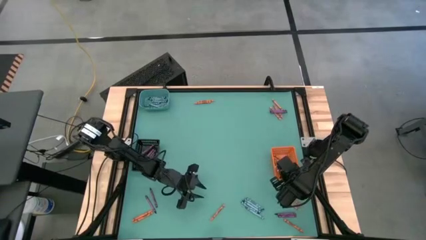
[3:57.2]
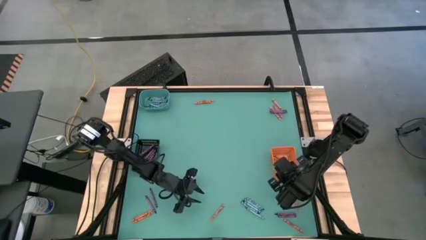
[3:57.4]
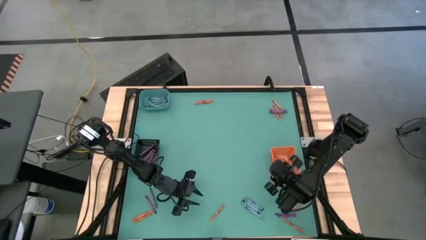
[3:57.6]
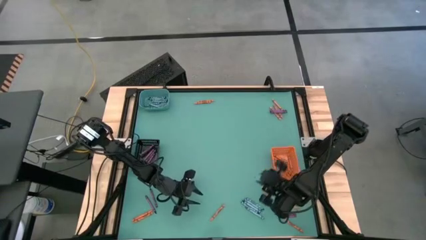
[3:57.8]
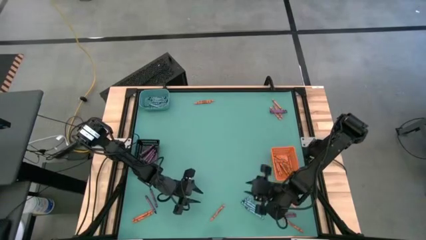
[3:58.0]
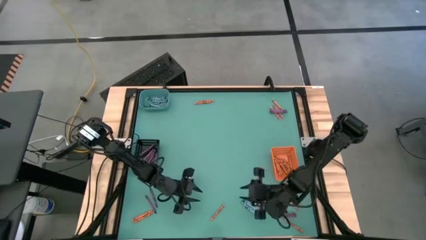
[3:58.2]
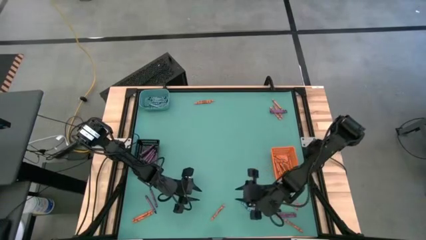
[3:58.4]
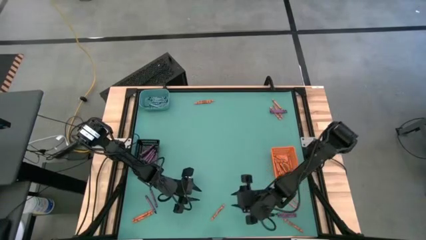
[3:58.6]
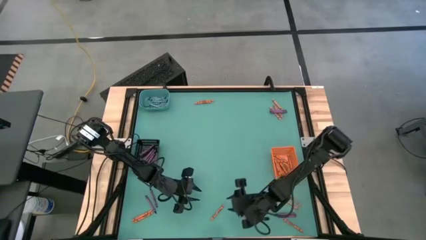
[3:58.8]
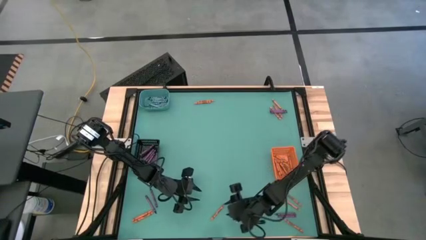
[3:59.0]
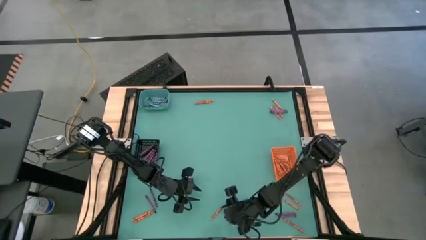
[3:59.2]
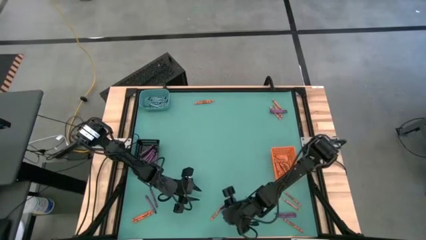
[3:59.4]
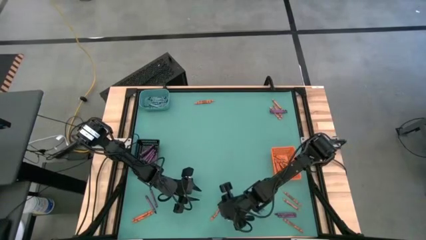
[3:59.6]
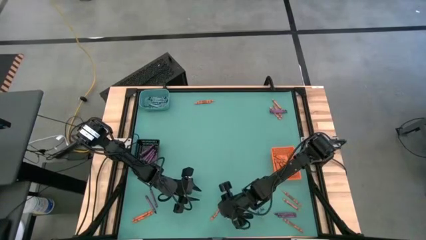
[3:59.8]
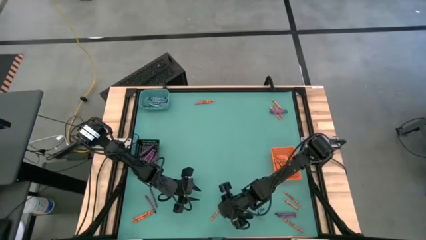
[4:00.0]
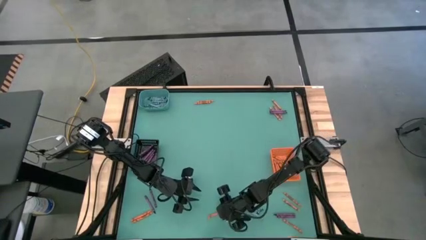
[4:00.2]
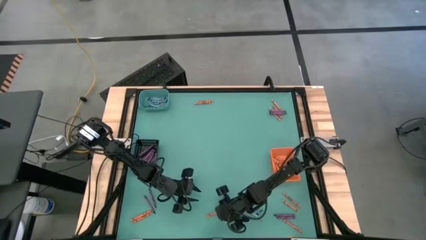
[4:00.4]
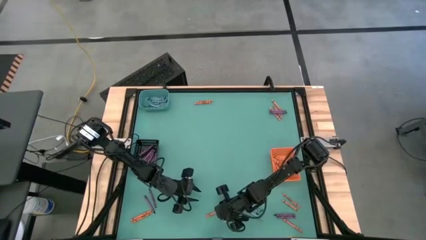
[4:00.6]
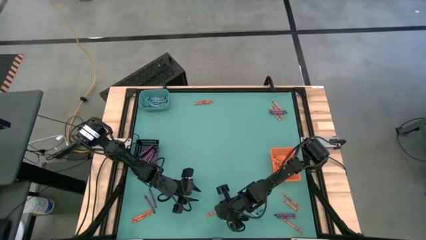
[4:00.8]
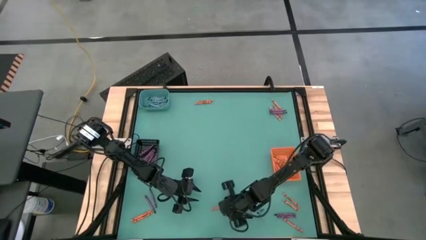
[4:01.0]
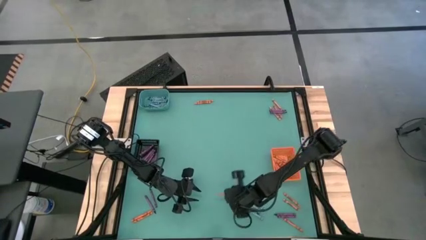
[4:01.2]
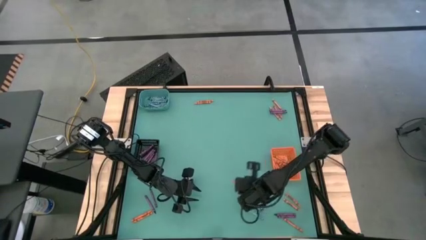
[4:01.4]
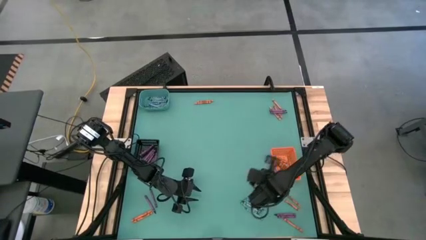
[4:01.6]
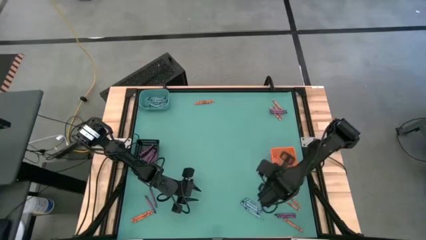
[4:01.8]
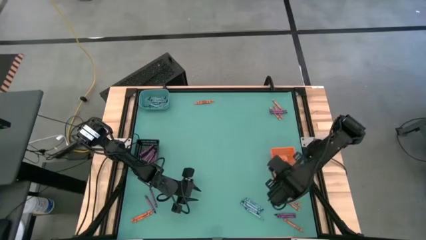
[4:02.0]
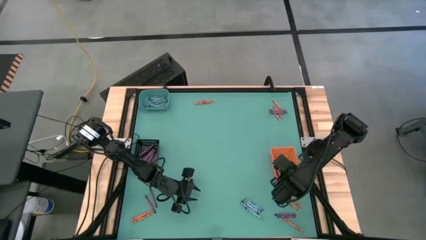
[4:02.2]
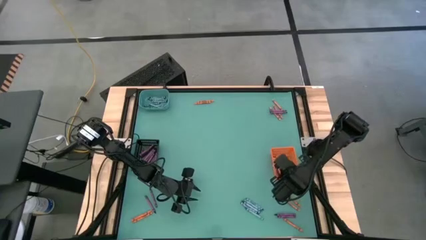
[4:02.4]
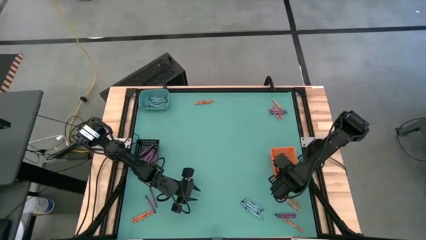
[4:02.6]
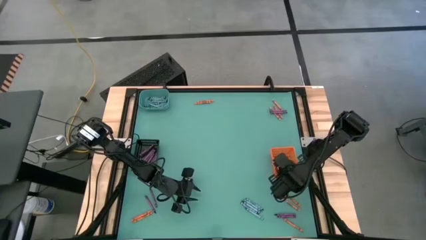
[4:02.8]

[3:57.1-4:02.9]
Task: Sort crayons
Put the orange crayon into the orange bin

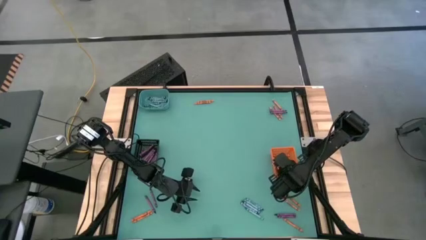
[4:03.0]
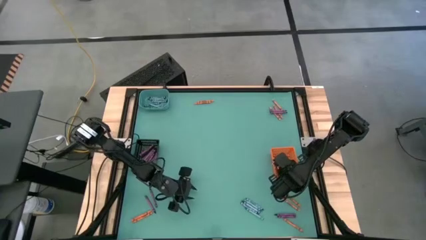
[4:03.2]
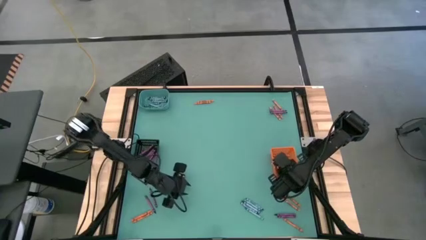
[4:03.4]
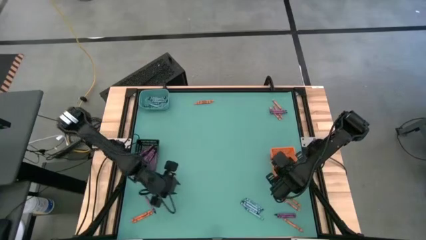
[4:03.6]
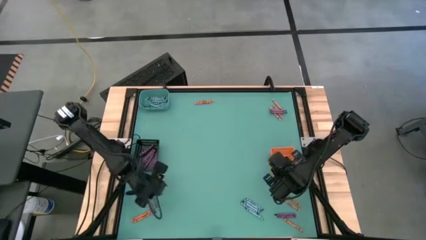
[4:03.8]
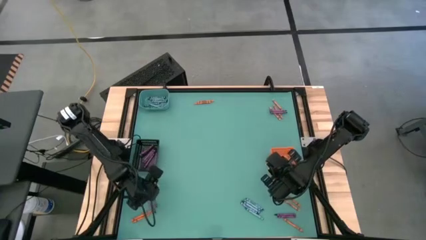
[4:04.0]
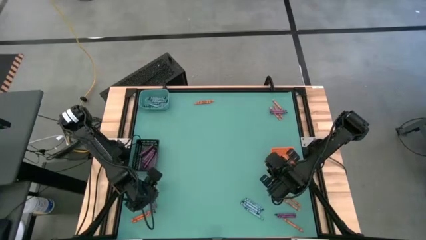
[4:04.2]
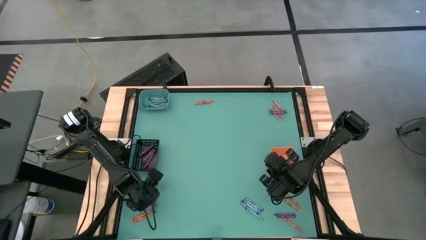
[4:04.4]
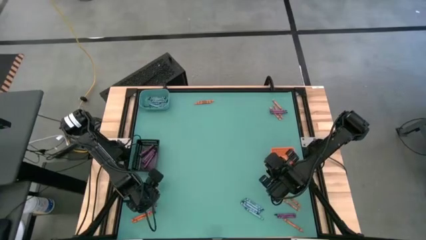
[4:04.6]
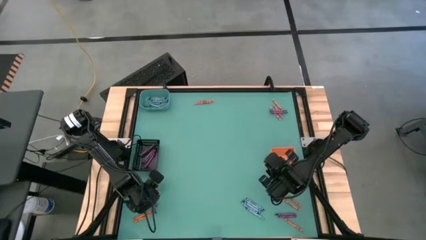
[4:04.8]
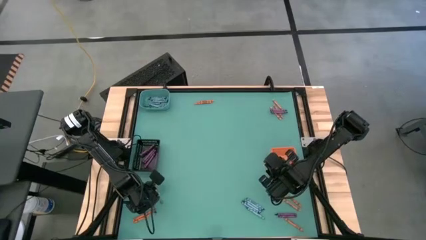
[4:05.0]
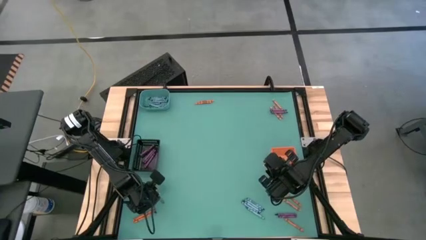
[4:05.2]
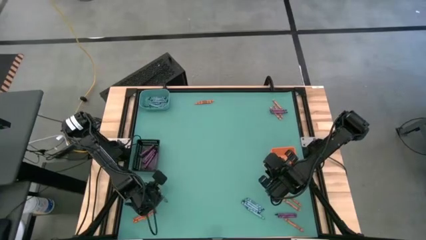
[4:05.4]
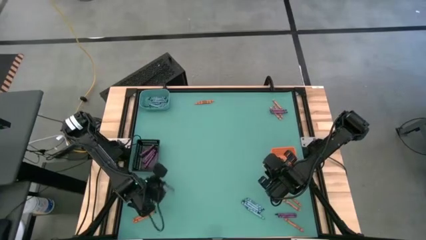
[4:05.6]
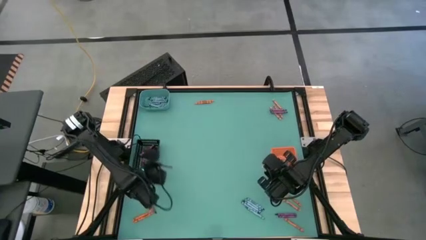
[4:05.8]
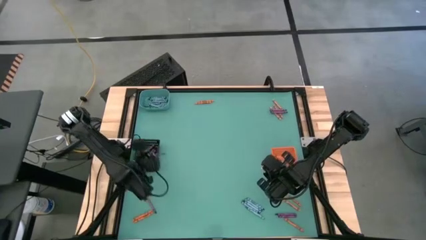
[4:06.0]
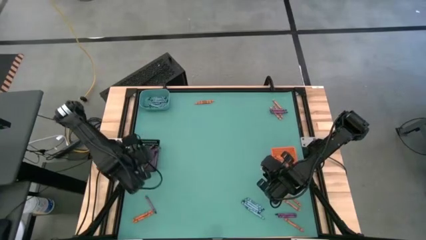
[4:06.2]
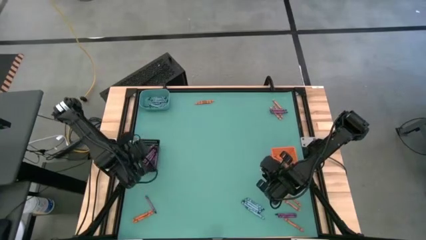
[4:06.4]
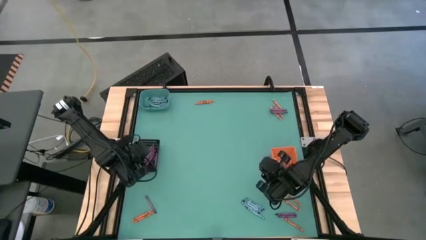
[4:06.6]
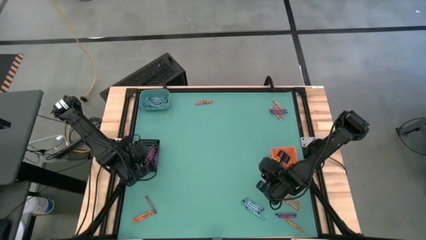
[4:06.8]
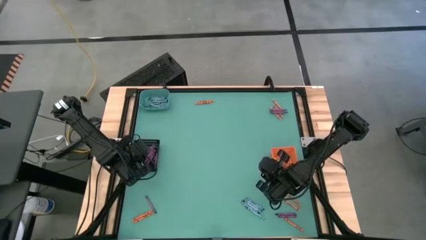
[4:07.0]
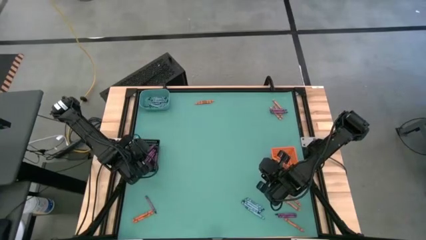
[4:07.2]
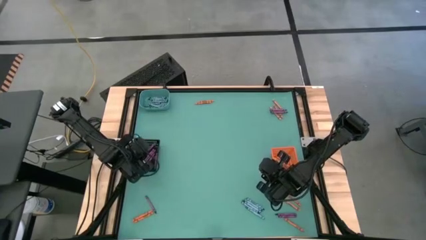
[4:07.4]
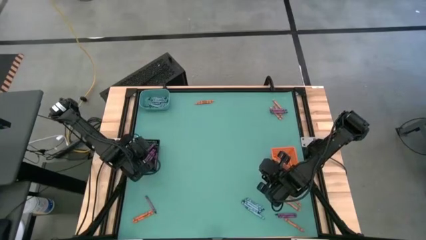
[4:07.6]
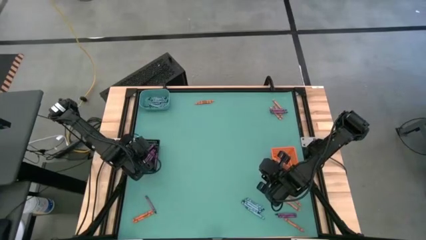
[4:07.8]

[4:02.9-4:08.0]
Put the purple crayon into the black bin

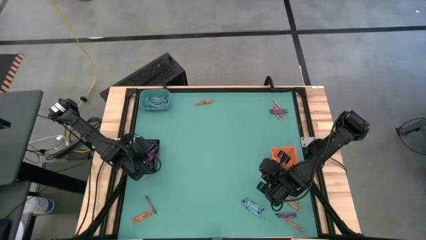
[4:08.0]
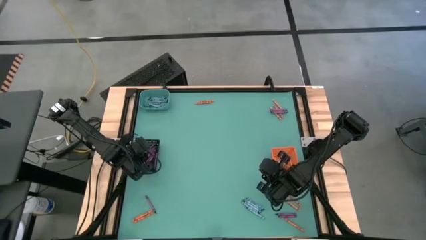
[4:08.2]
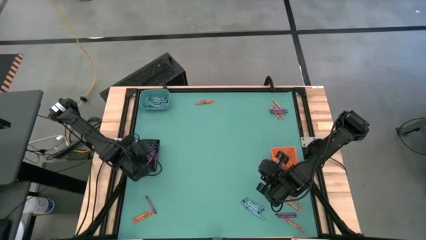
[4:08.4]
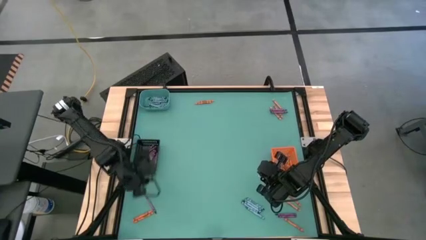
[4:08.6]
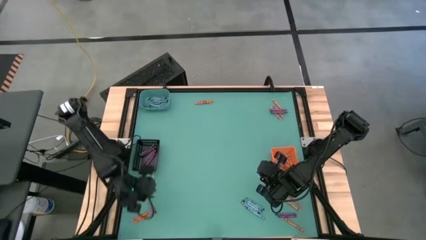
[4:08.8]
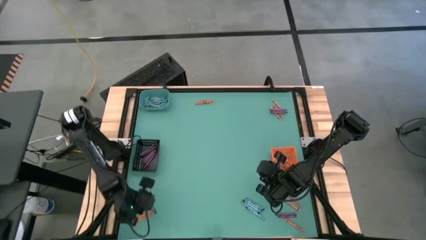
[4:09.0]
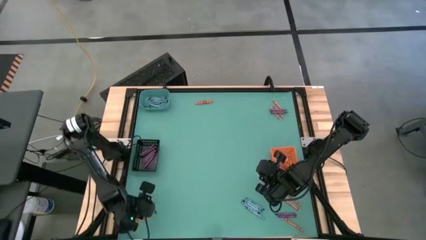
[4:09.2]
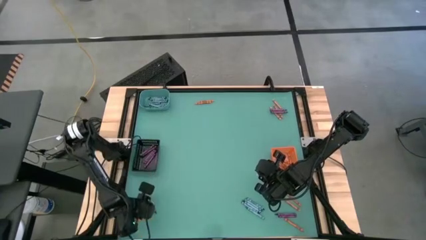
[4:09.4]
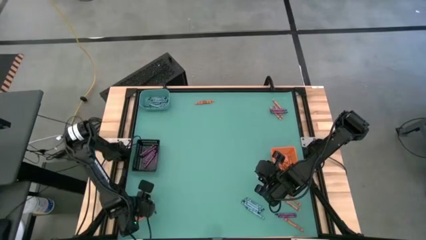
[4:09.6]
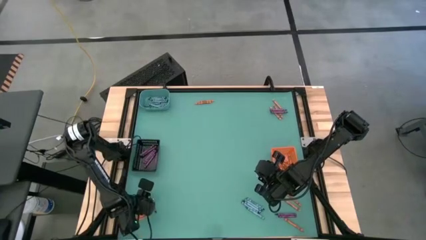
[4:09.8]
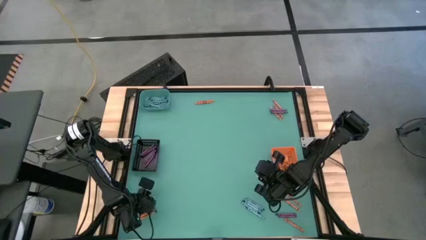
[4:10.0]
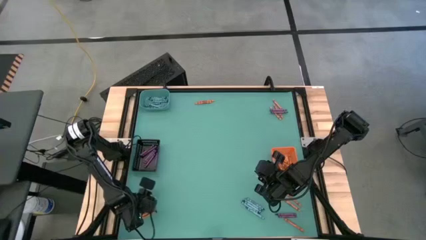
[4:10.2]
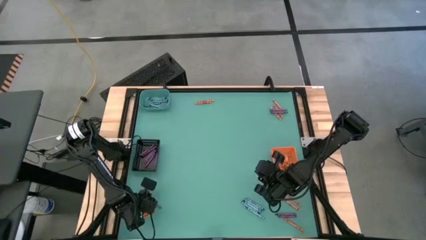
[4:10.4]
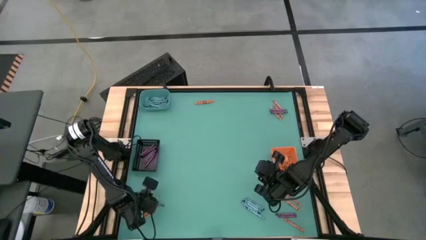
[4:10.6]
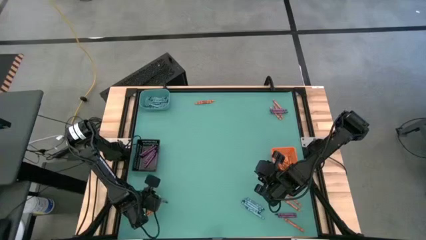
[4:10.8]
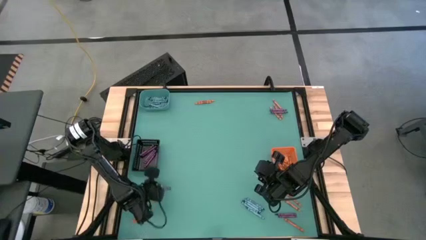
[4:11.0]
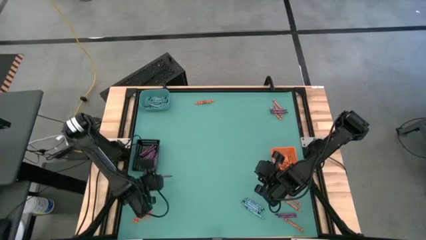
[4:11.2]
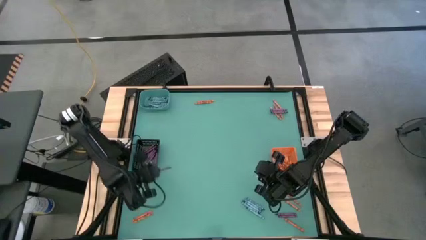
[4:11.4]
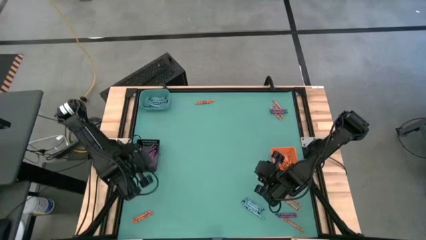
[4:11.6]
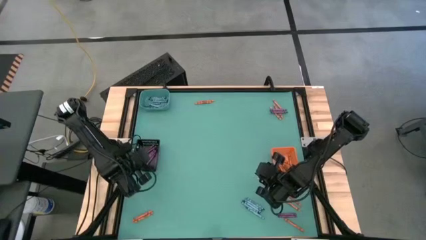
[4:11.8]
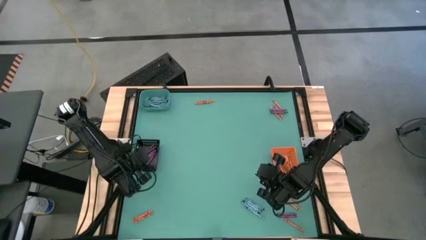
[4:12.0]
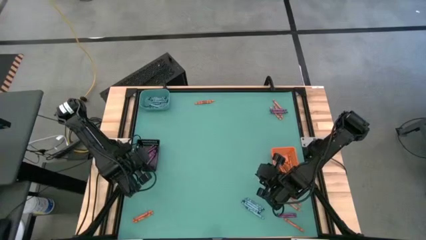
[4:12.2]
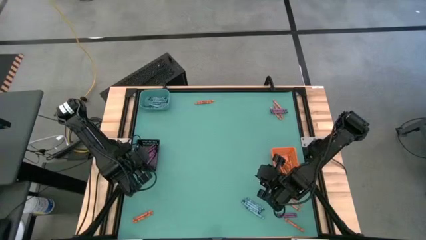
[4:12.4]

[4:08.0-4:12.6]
Put the purple crayon into the black bin
